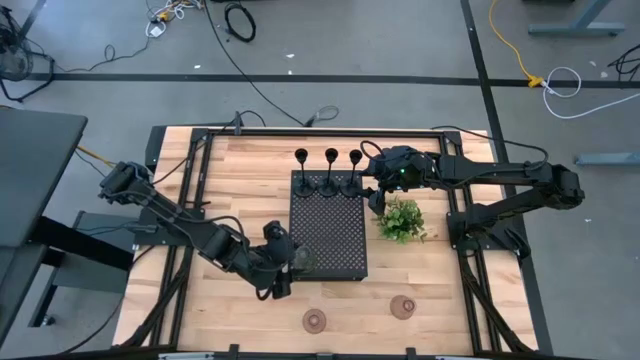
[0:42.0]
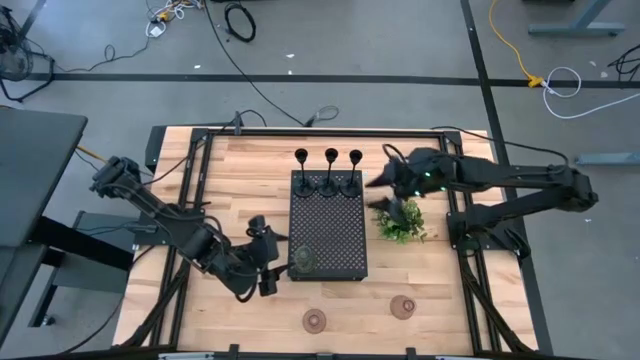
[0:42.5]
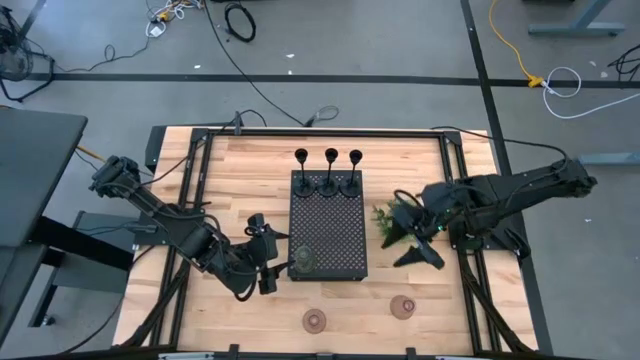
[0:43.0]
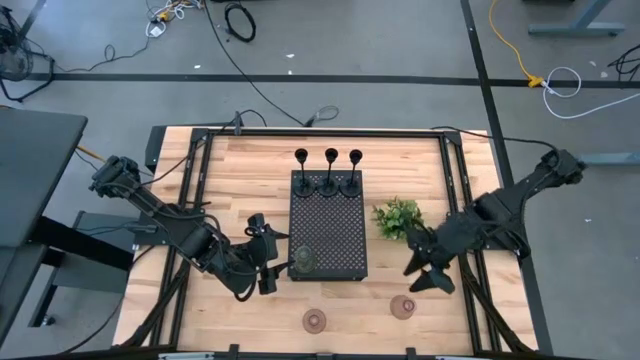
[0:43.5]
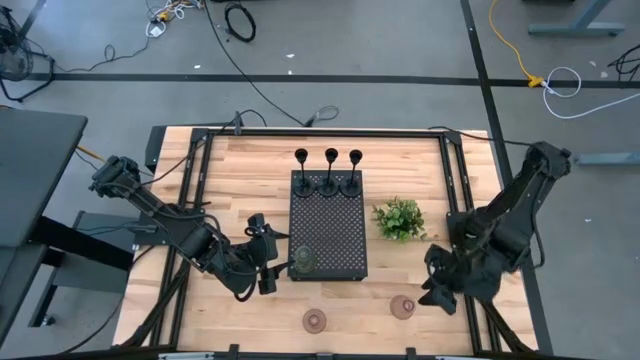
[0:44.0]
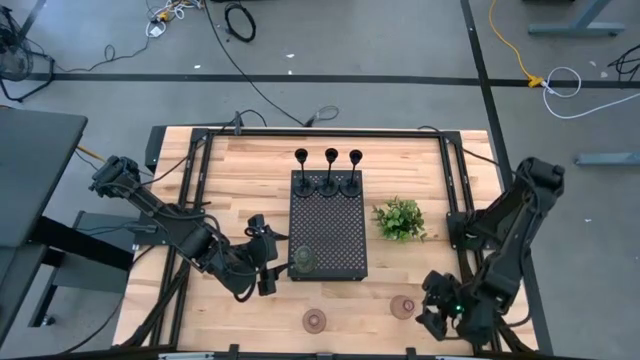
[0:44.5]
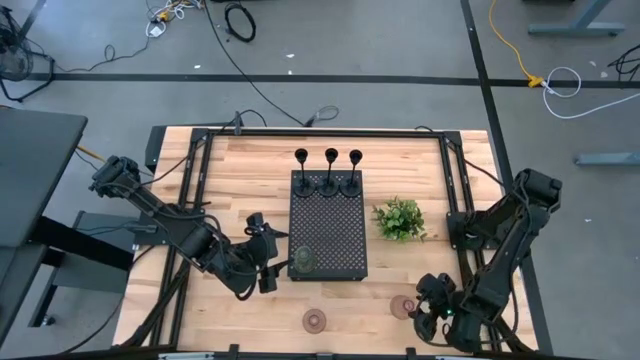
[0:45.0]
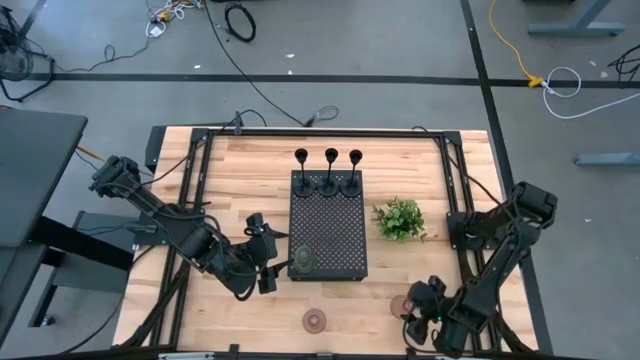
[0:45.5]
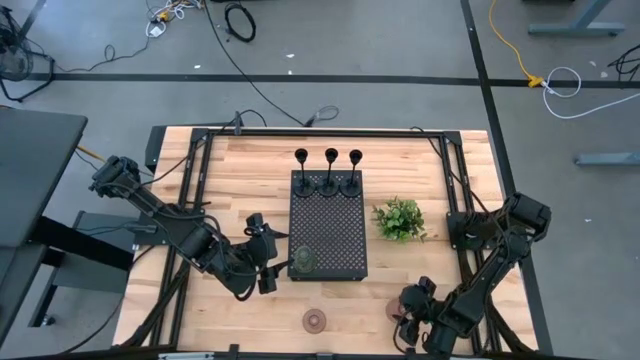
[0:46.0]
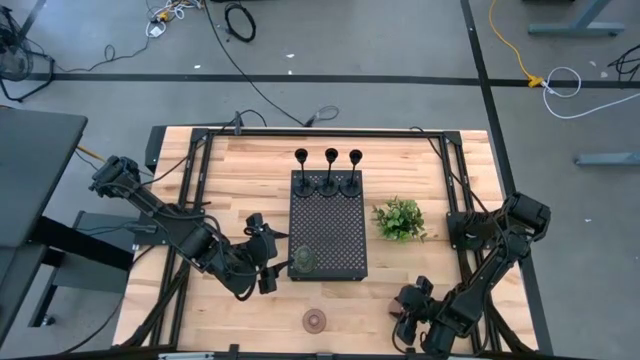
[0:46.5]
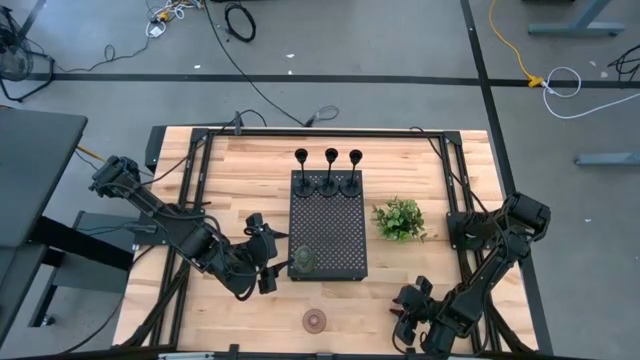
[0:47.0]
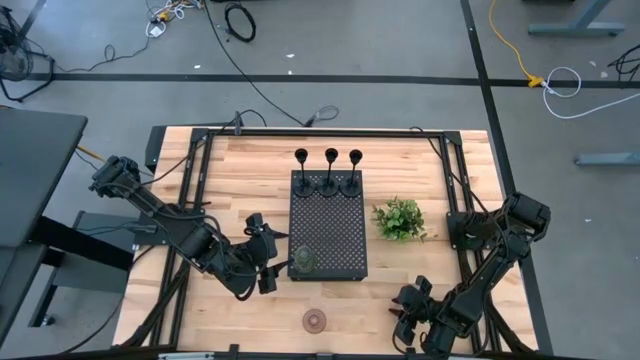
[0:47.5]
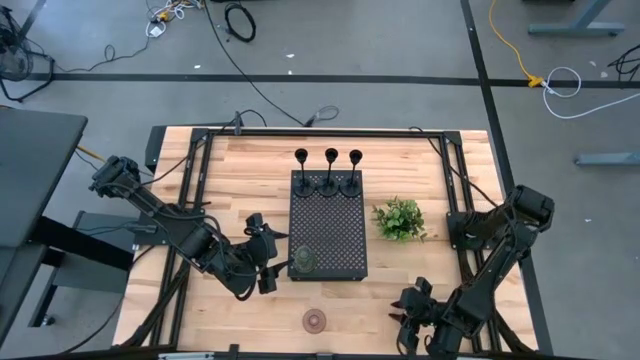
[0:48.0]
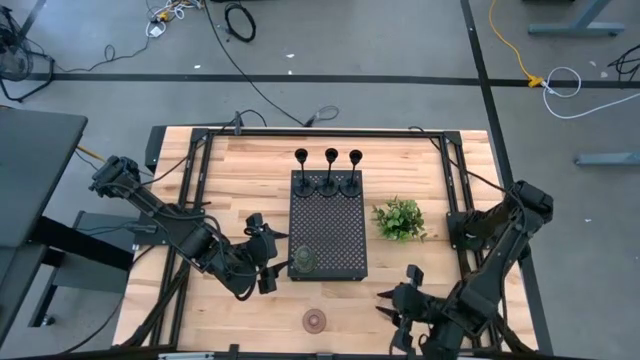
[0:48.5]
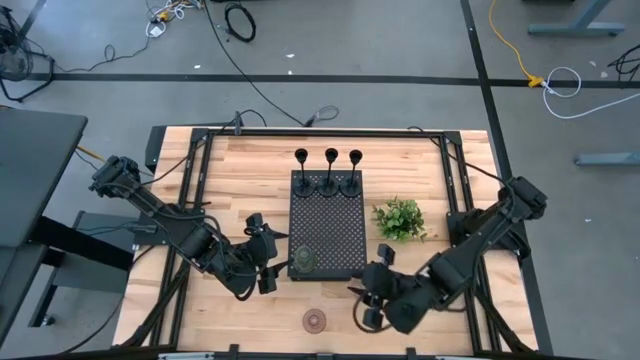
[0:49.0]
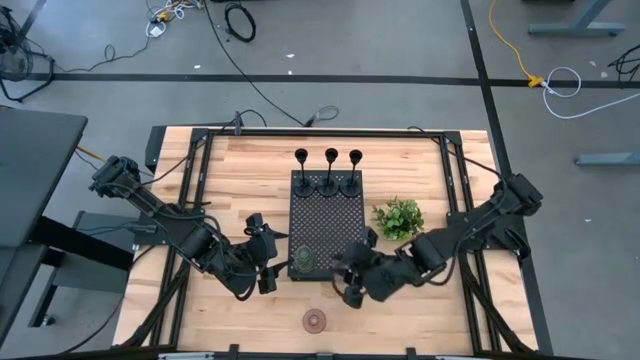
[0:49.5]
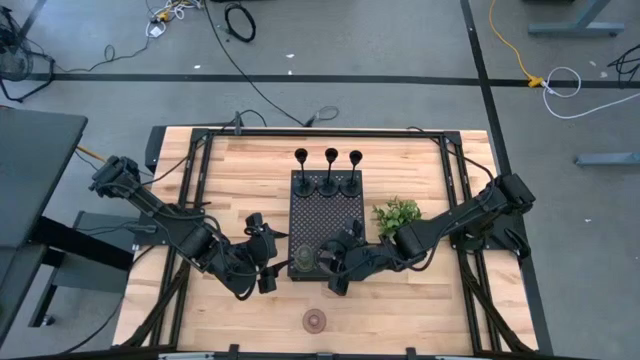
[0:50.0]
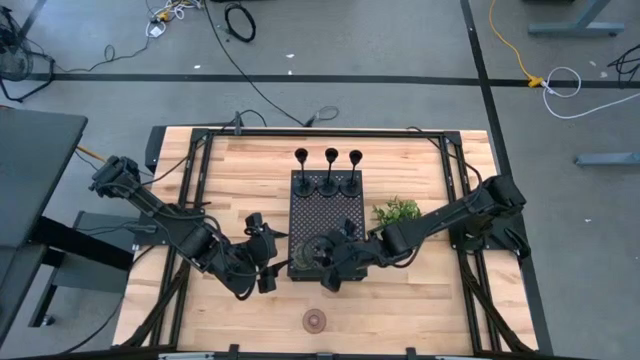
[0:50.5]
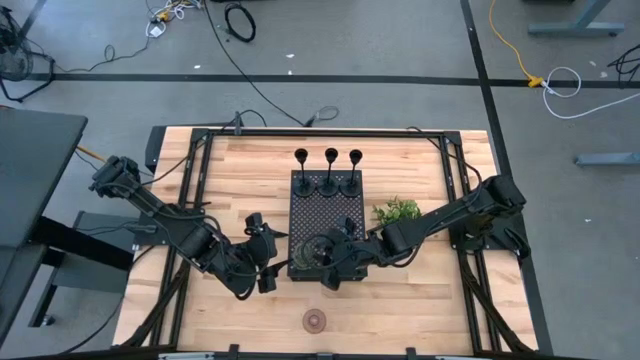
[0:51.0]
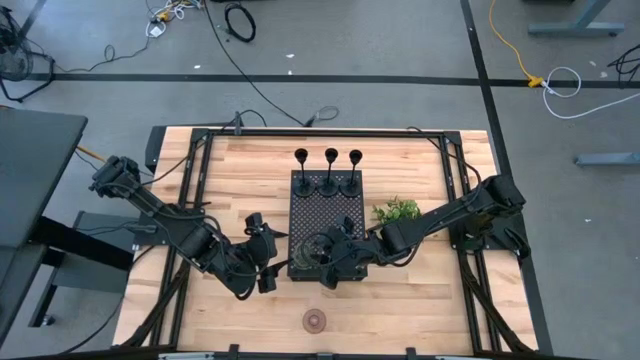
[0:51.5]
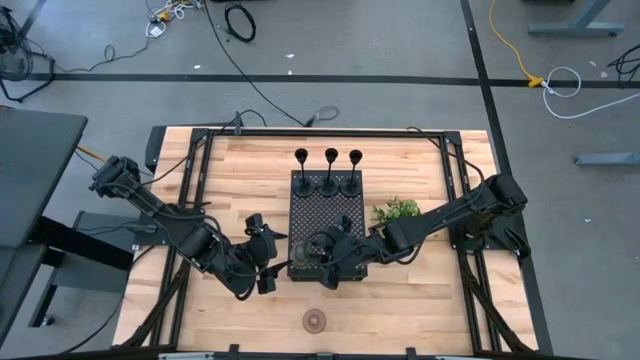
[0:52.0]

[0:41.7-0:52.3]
Task: Pick & Place candle stick holders
Put the right pink glass candle holder on the shelf

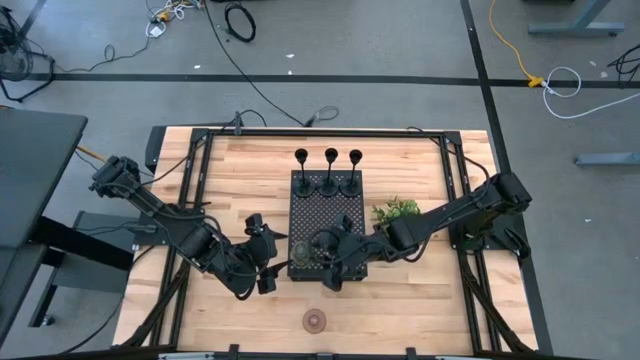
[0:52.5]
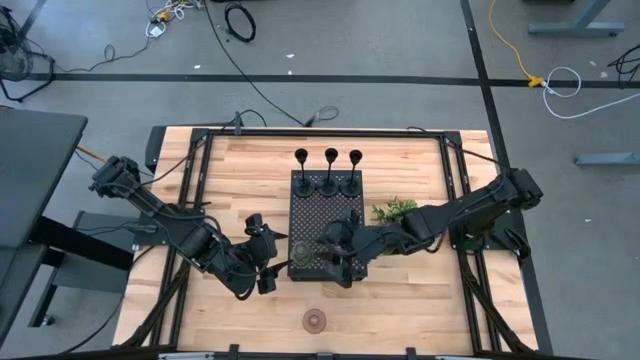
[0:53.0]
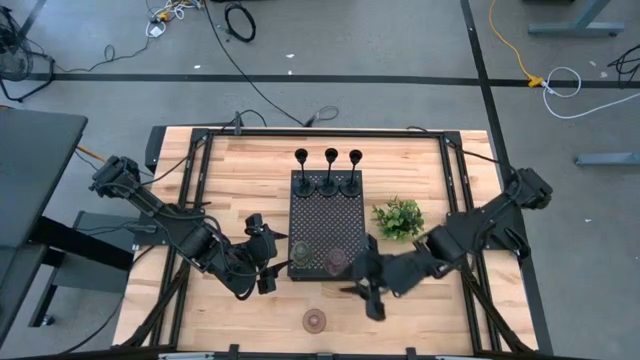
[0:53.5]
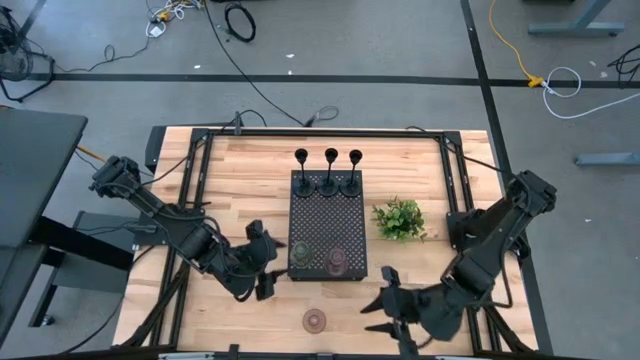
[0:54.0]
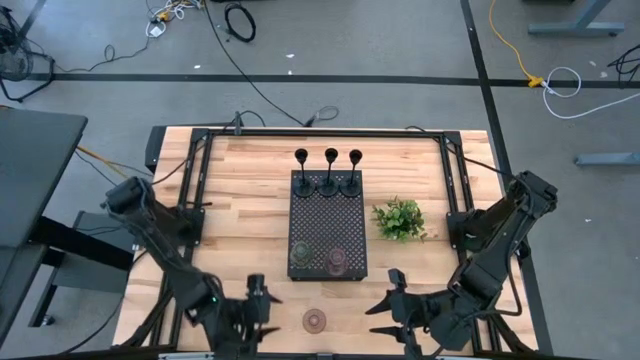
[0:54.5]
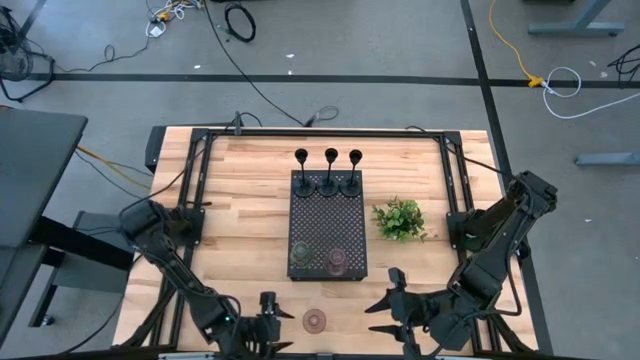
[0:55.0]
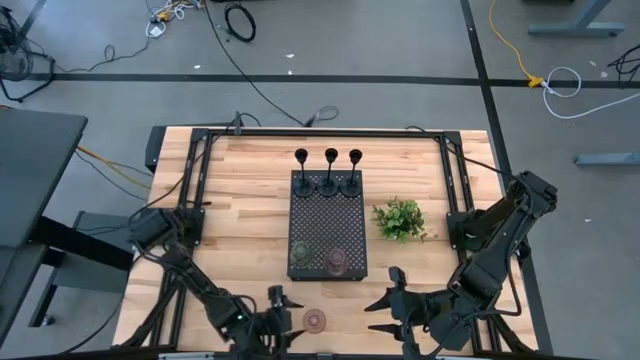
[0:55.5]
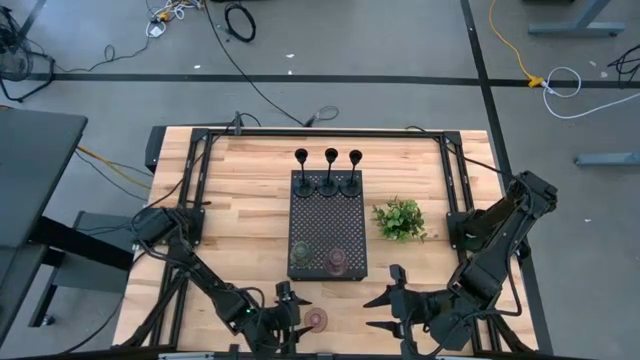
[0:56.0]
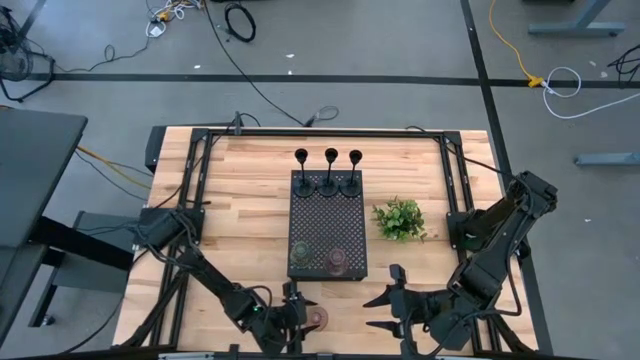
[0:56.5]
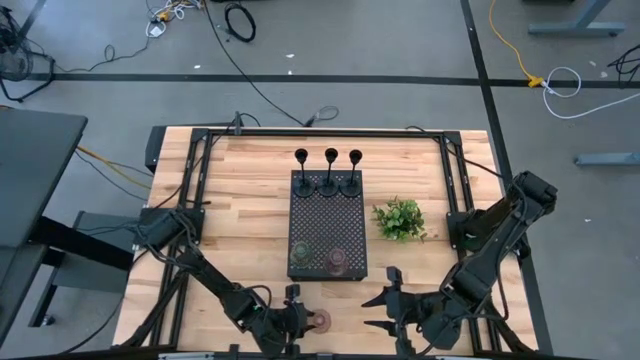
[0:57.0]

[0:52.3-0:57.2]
Put the pink glass candle holder on the shelf

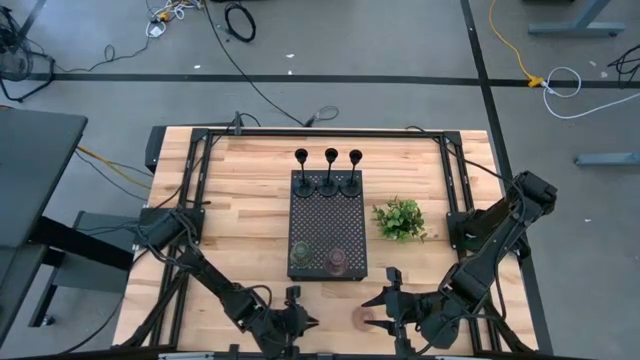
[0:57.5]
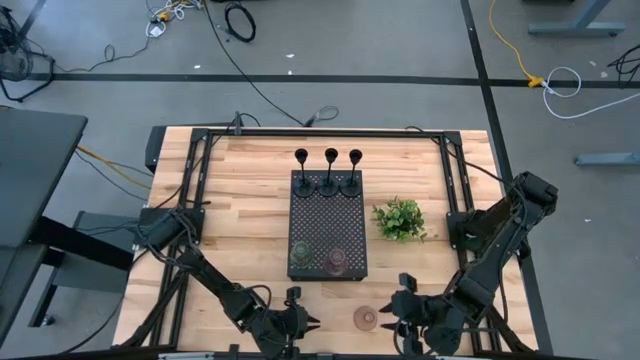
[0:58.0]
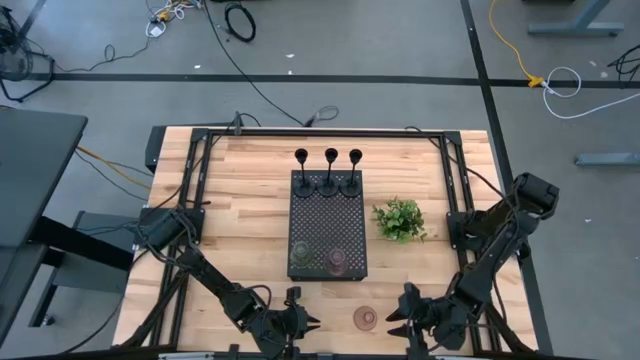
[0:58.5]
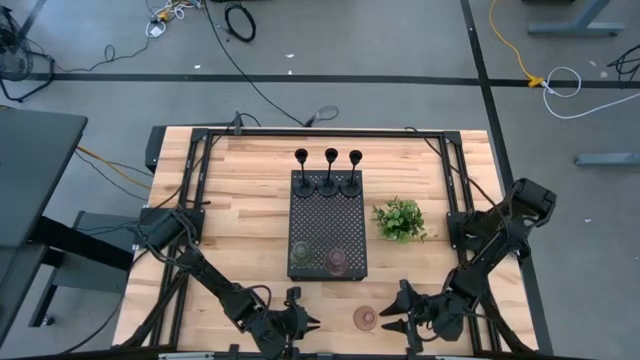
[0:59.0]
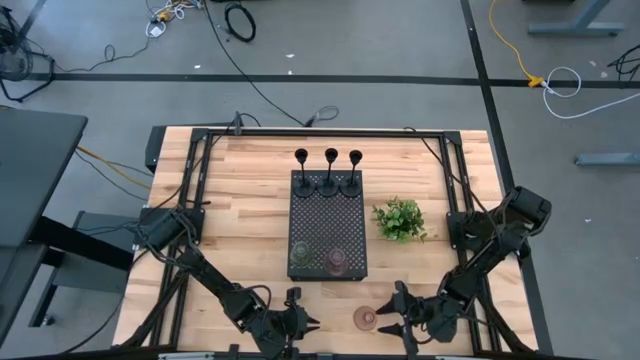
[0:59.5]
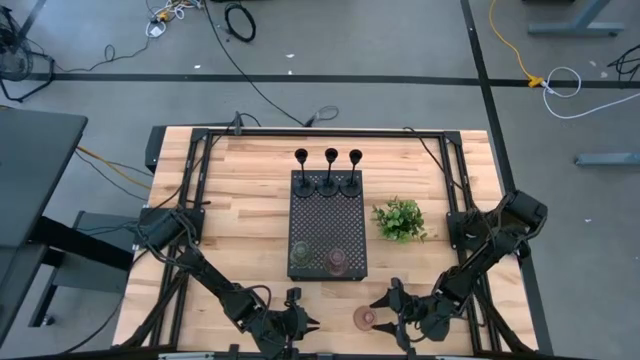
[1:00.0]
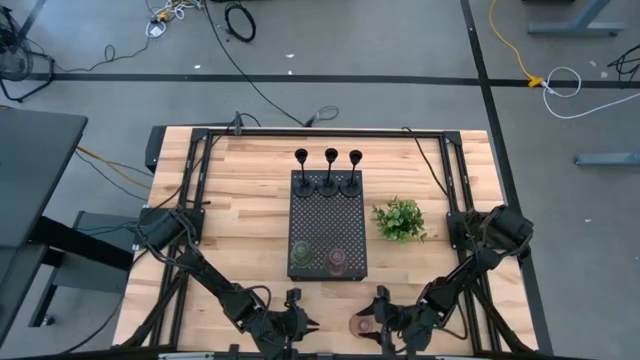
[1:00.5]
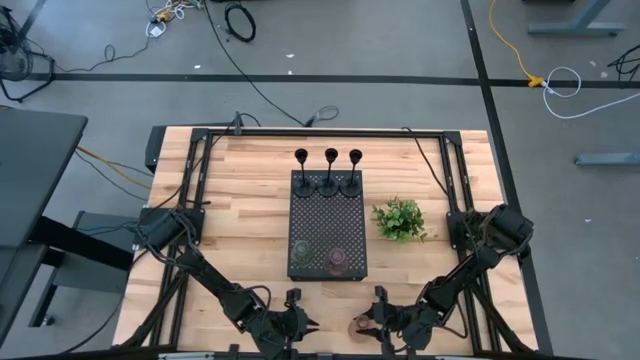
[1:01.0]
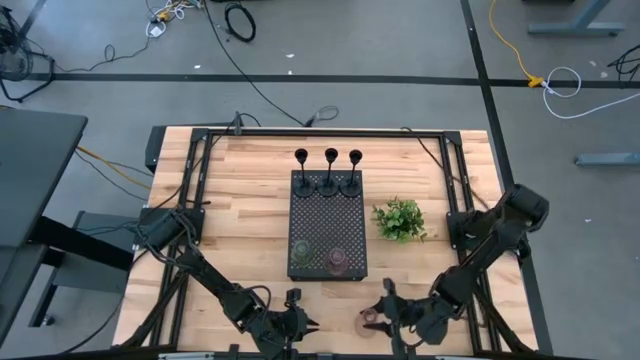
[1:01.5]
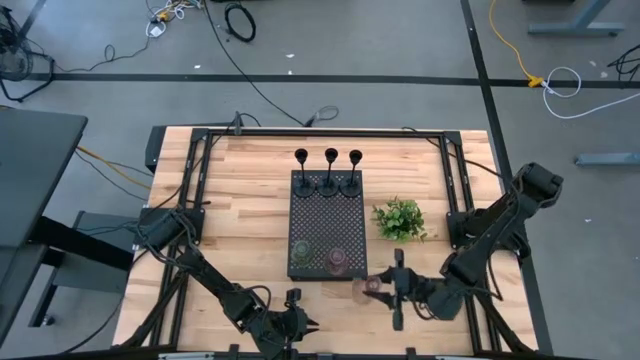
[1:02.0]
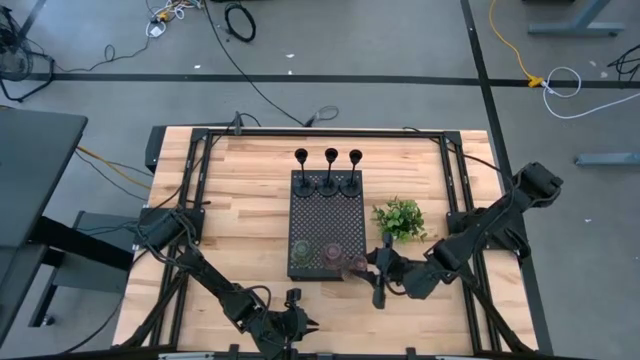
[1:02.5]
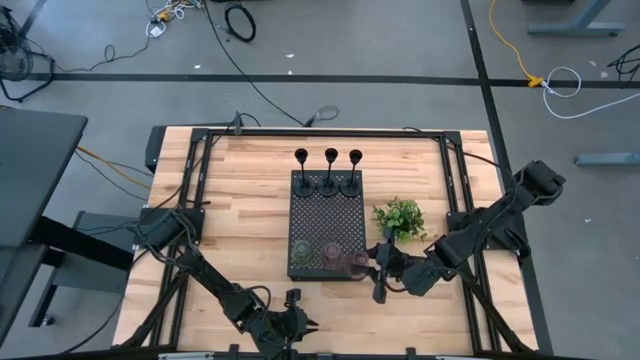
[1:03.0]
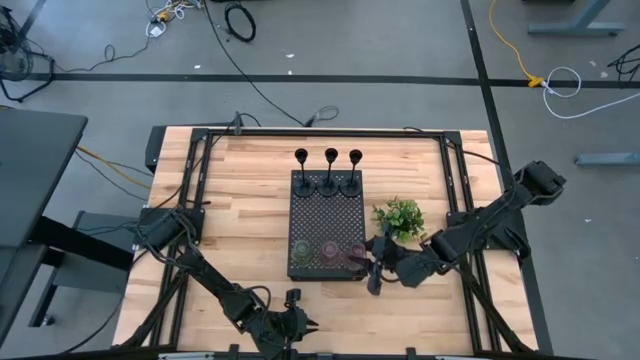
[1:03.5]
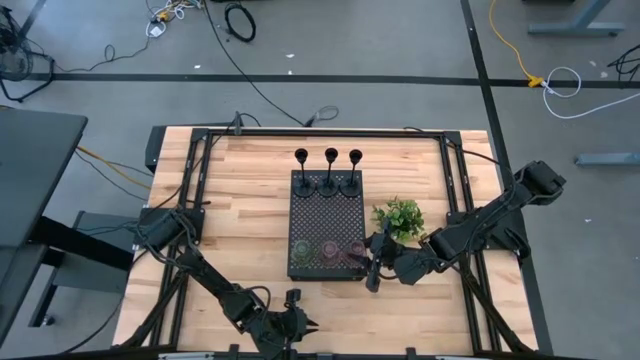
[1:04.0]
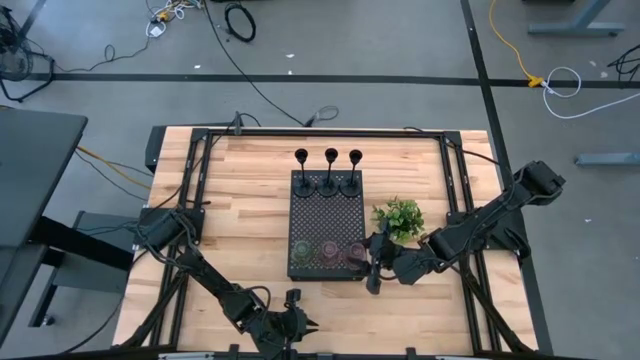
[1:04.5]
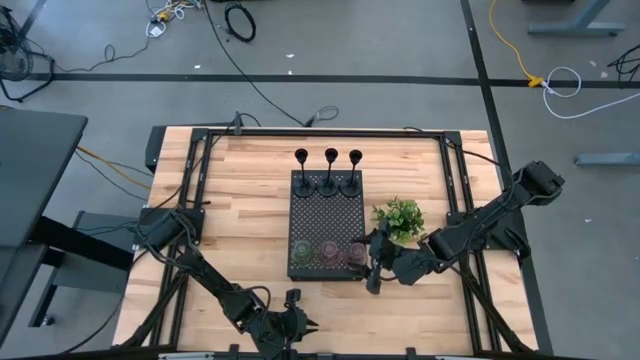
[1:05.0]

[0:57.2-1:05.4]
Put the pink glass candle holder on the shelf
